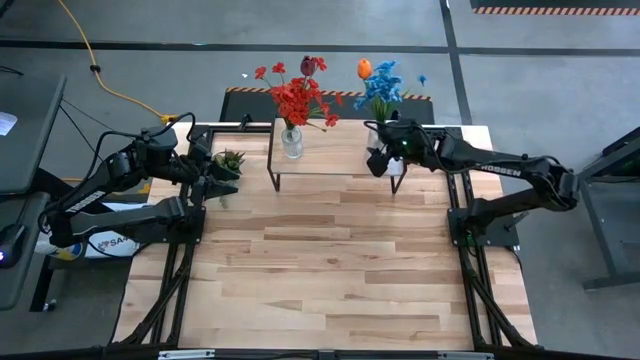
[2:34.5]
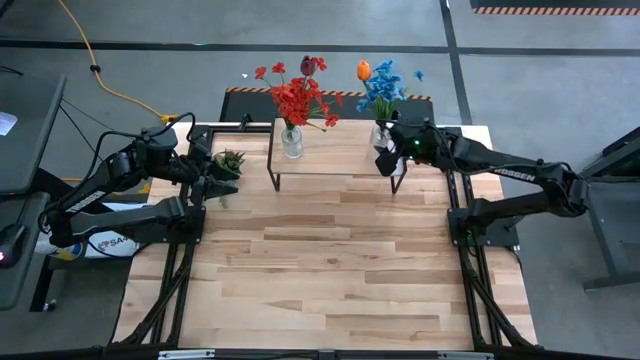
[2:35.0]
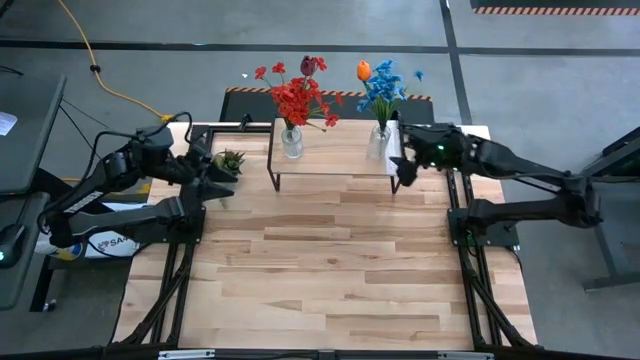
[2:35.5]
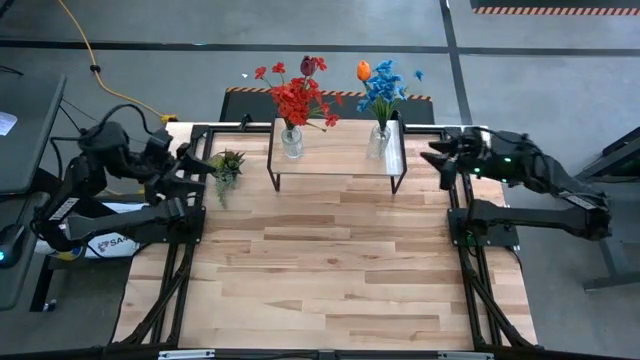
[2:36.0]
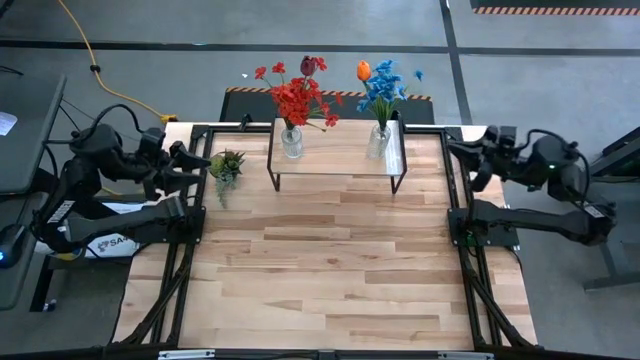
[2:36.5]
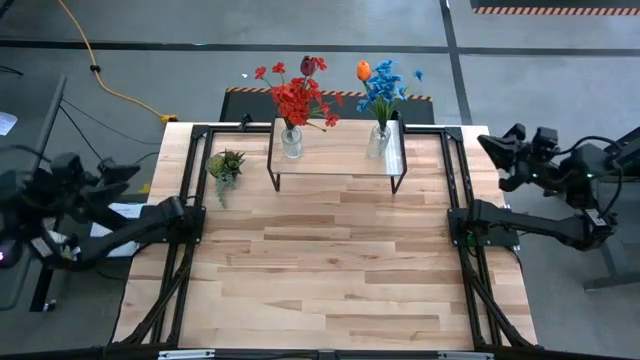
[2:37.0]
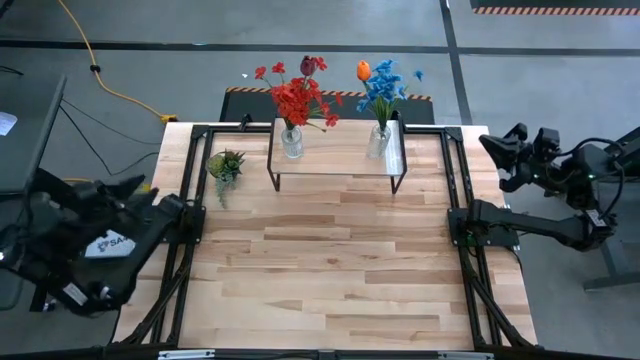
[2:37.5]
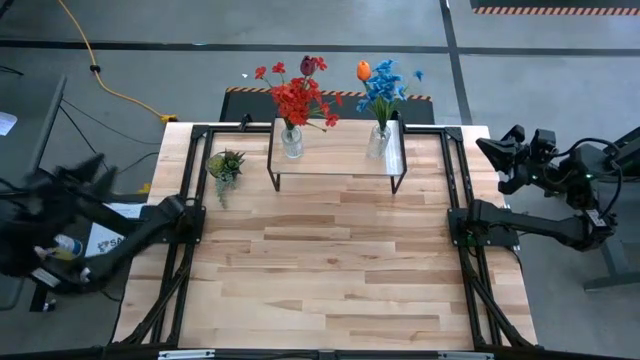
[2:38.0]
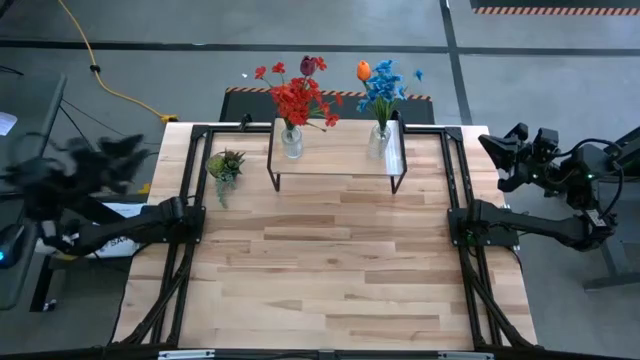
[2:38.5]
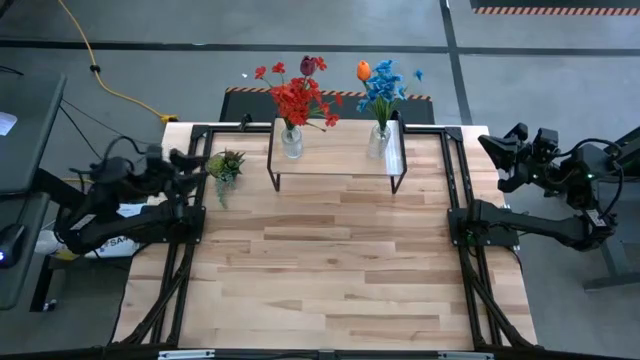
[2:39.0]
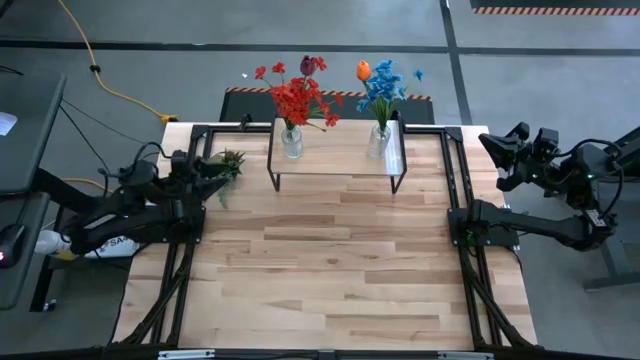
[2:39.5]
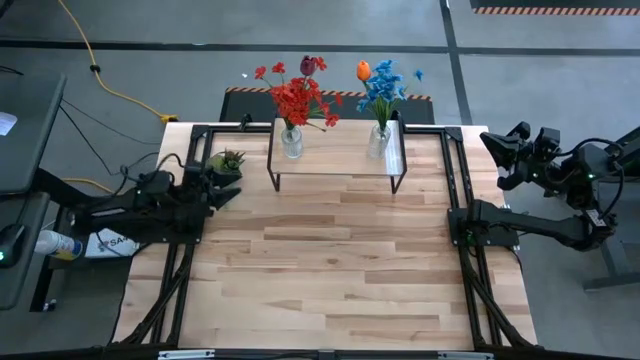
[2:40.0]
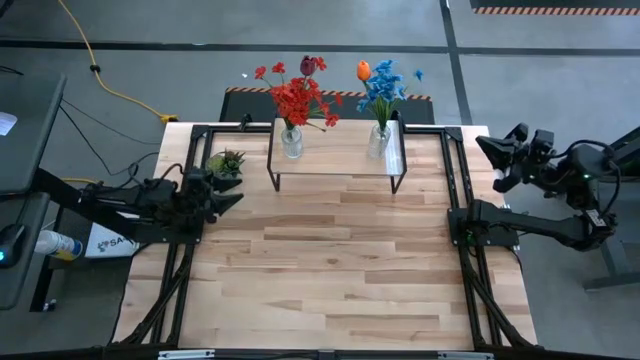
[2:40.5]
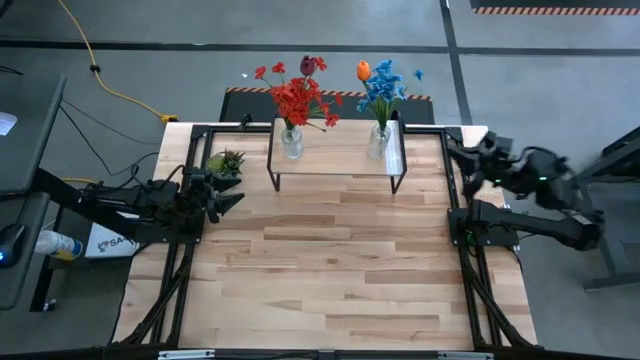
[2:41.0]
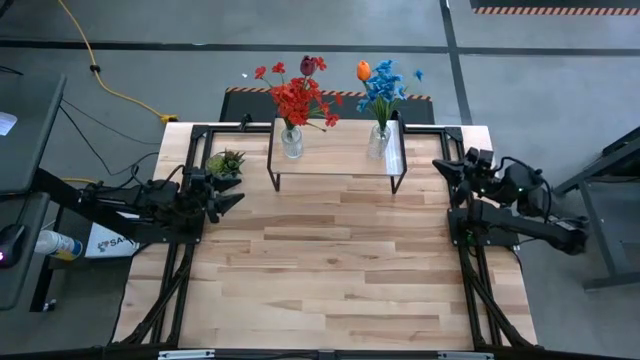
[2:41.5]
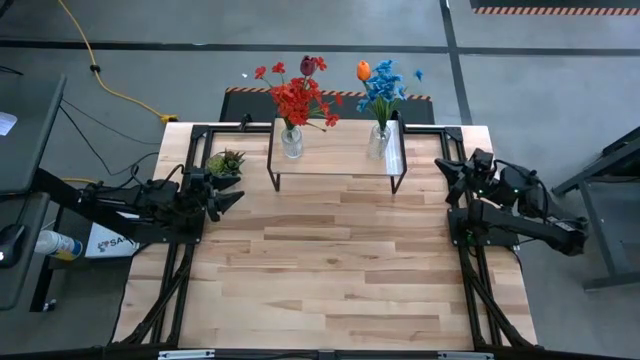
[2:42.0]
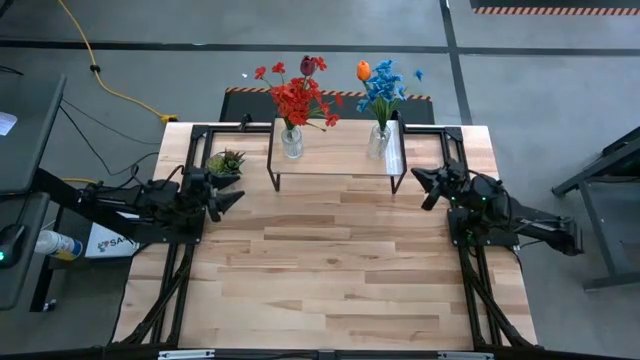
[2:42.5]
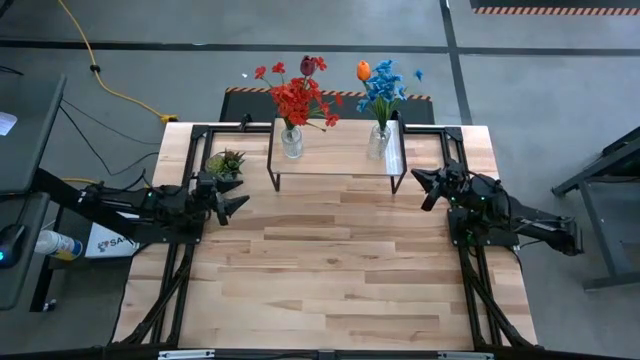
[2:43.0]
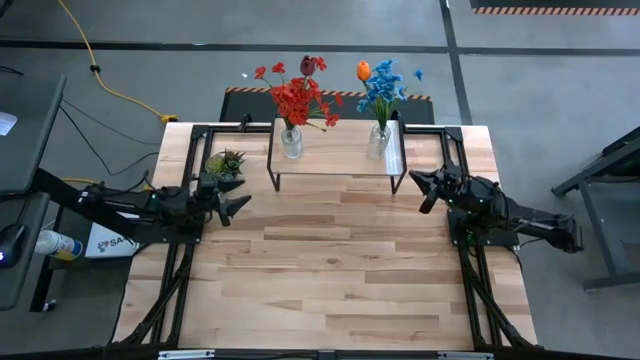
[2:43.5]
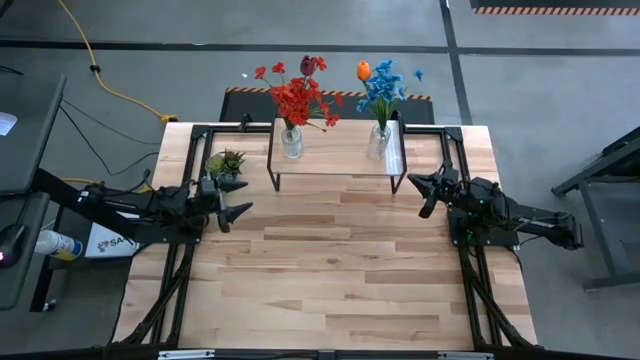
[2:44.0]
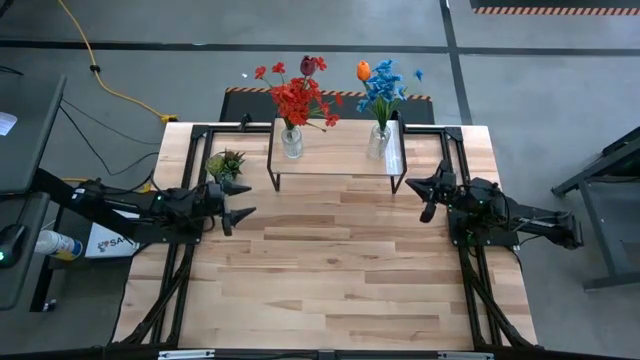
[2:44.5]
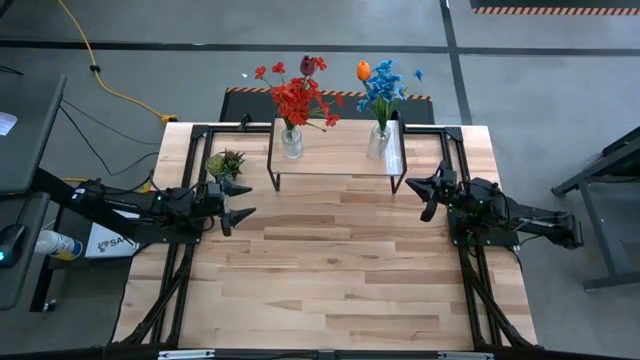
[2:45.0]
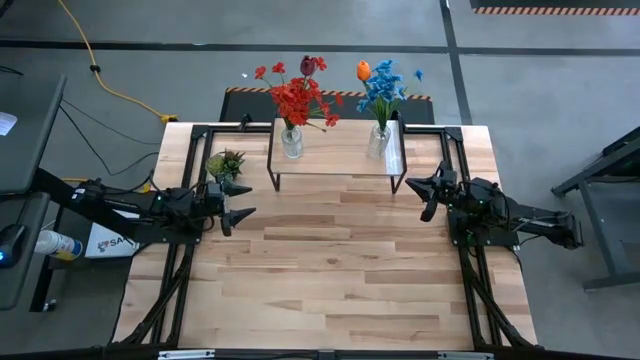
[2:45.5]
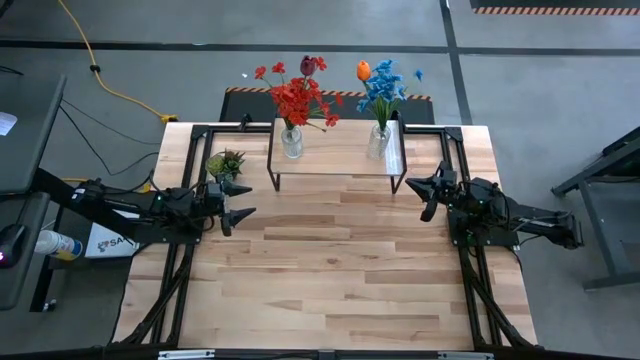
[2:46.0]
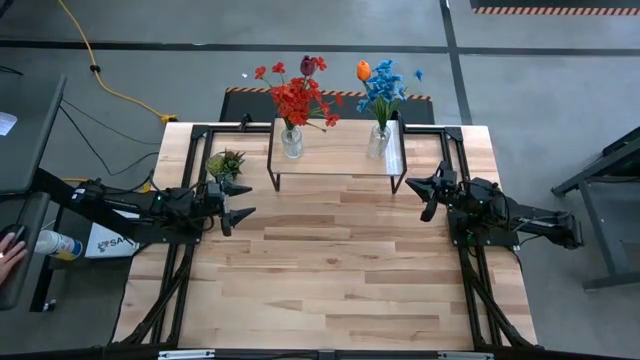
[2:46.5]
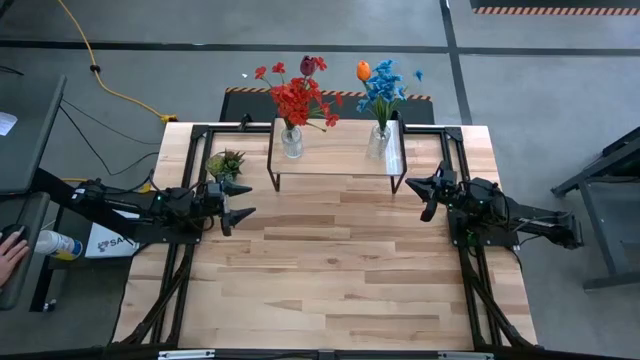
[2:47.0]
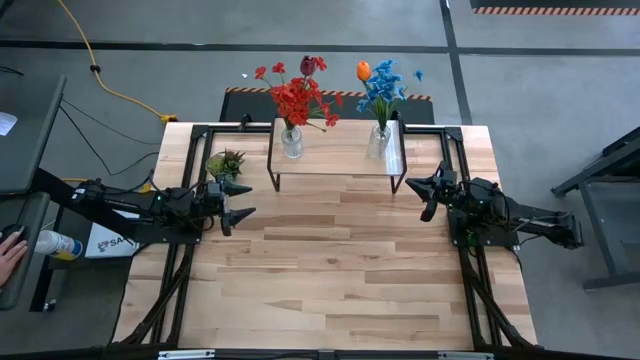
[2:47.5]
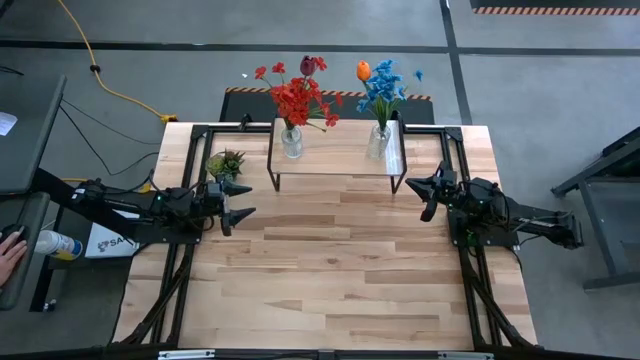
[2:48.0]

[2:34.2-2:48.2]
Task: Pick and place flowers into a vace then onto a shelf
Return to Home Position

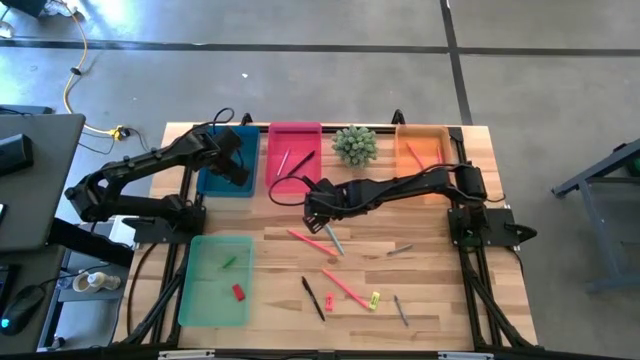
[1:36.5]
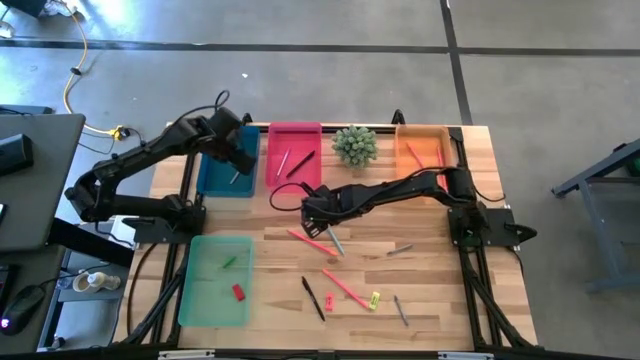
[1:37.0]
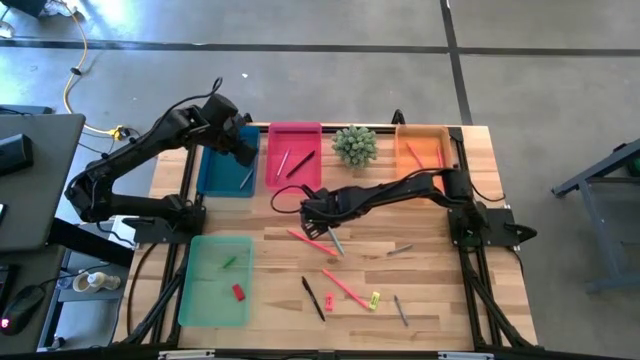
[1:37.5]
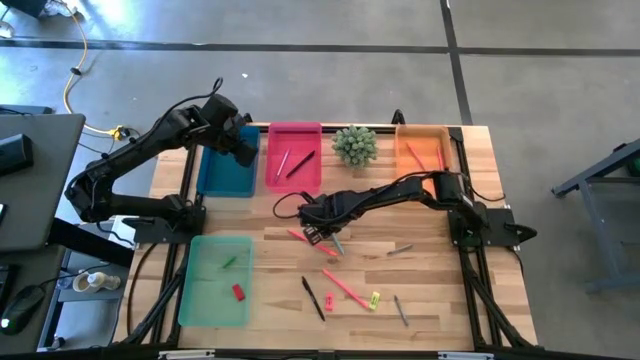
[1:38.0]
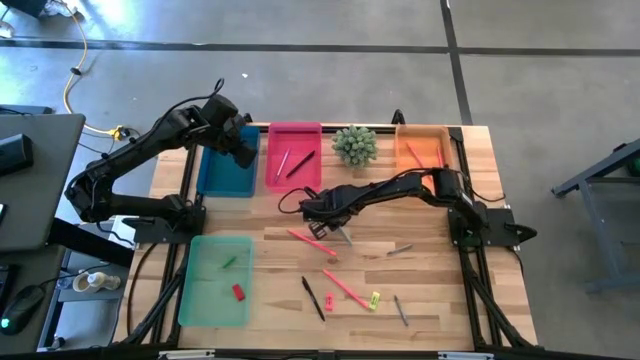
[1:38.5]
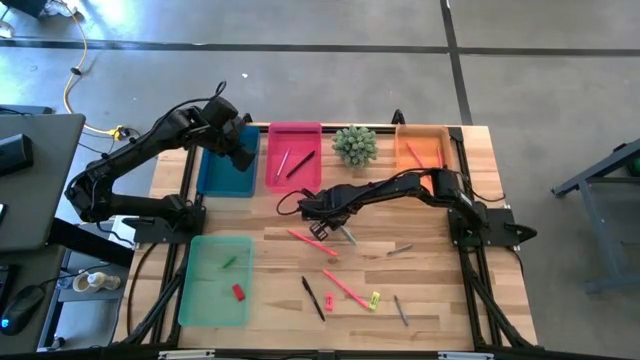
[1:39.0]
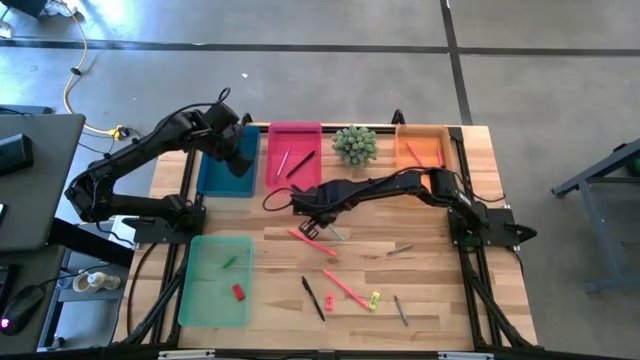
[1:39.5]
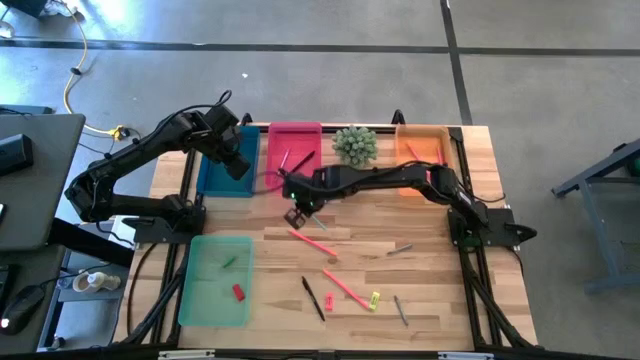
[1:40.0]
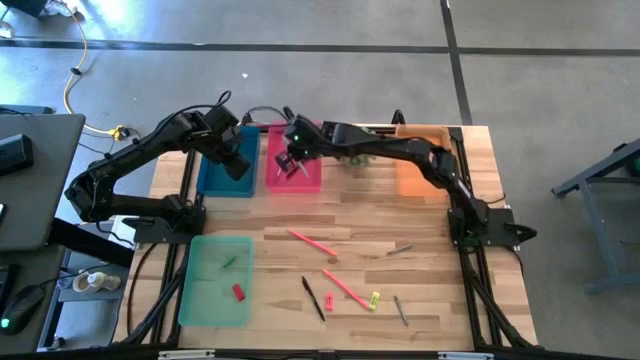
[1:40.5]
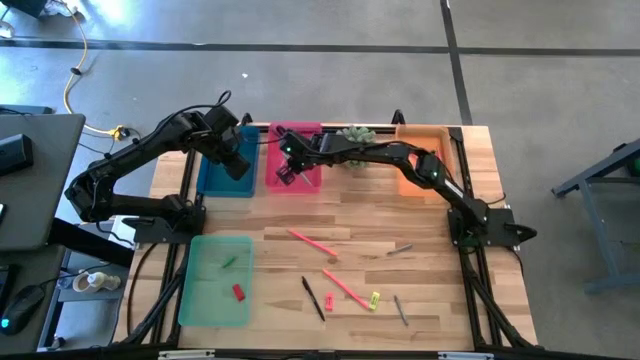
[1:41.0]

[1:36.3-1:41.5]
Task: Sort crayons/erasers/pens/pencils in bins
Put the gray pen into the pink bin
